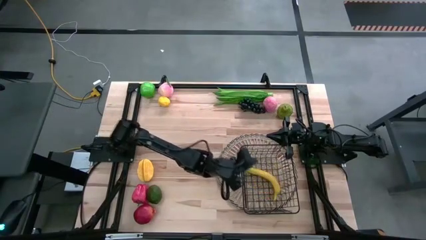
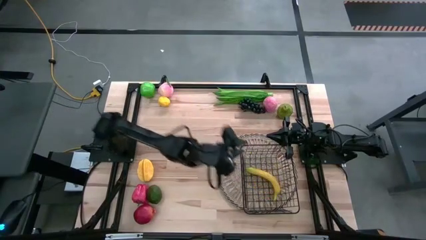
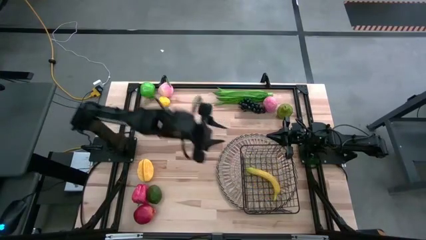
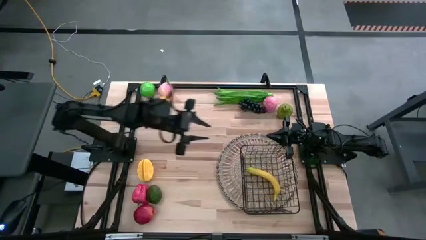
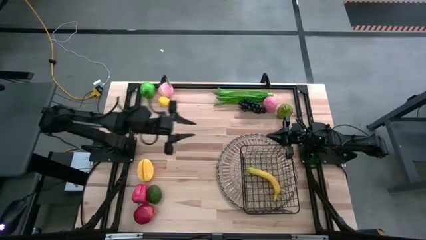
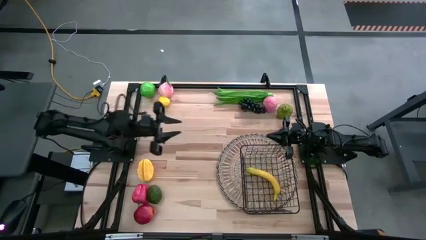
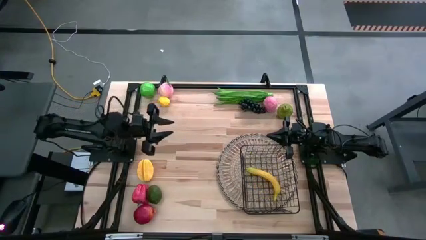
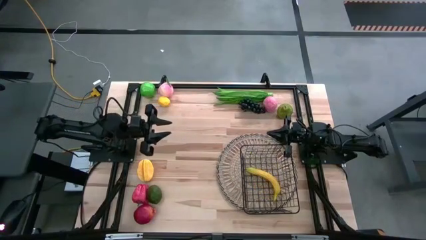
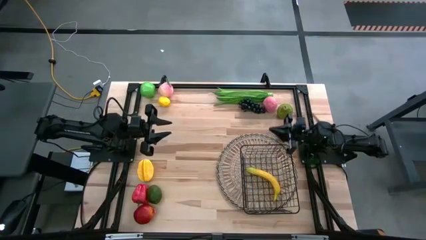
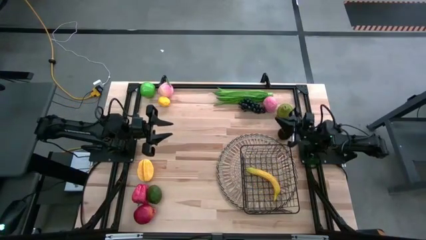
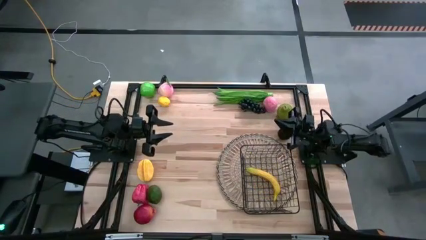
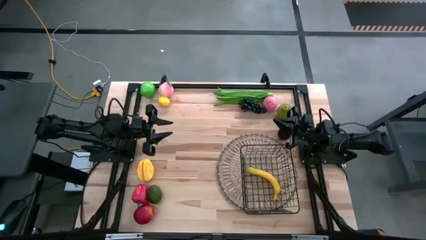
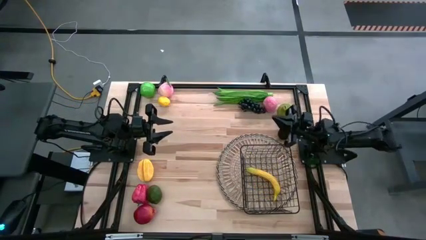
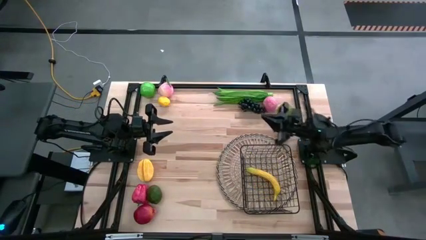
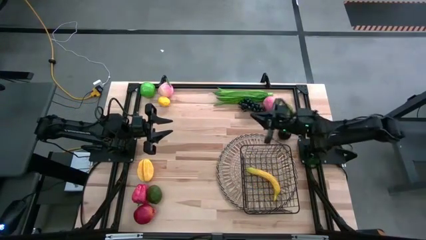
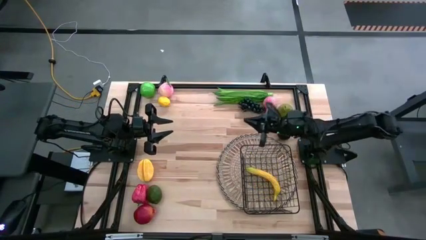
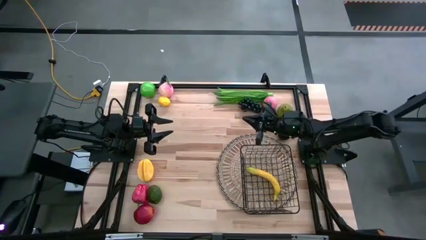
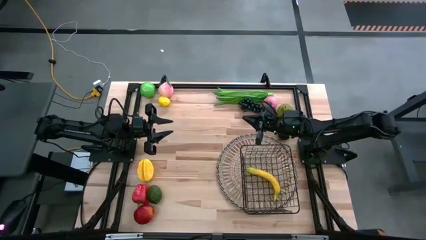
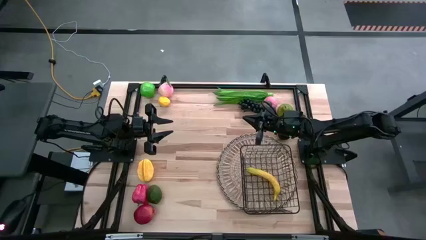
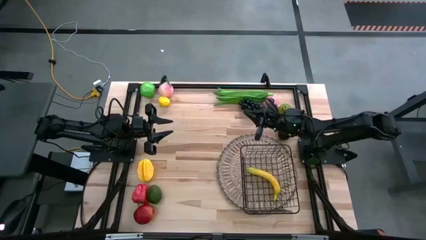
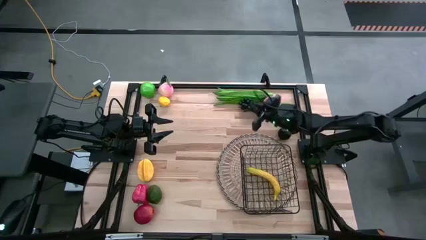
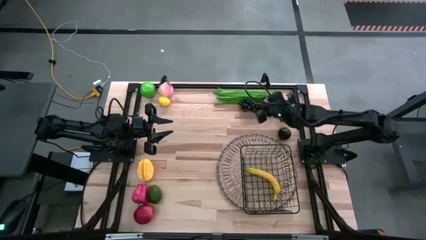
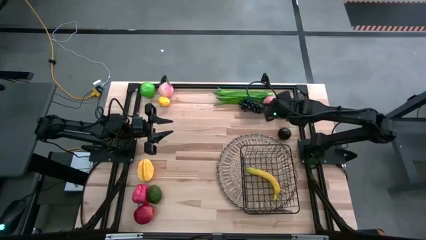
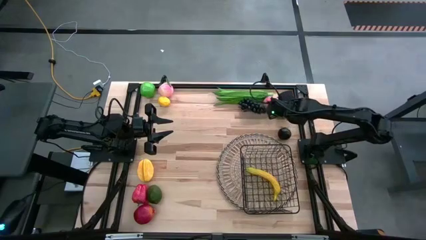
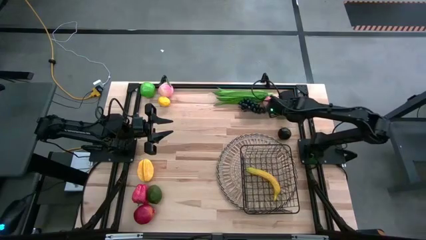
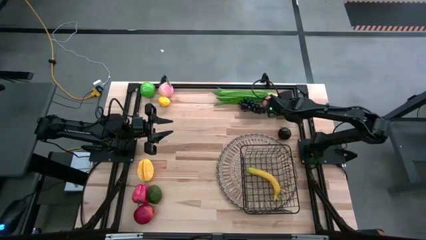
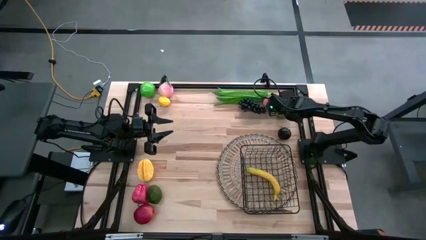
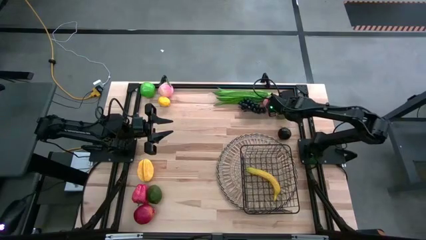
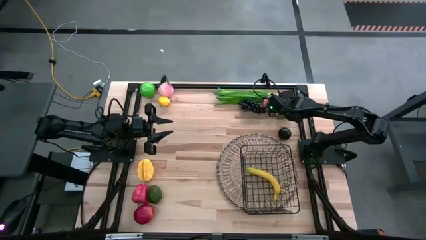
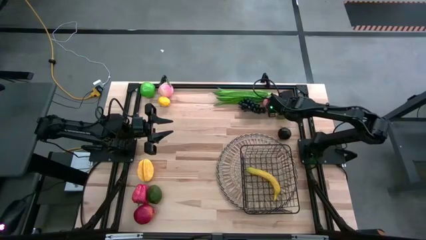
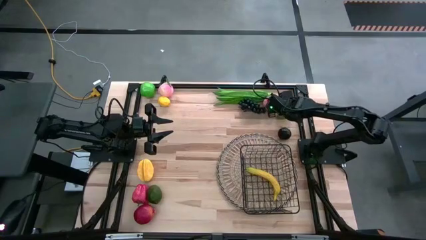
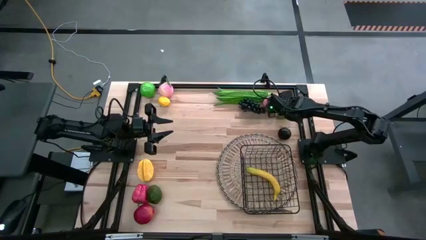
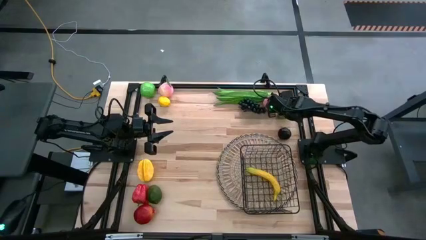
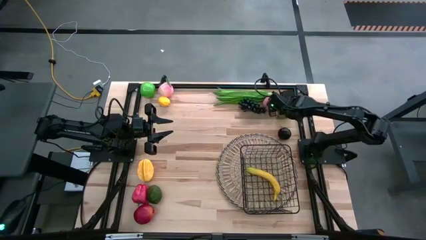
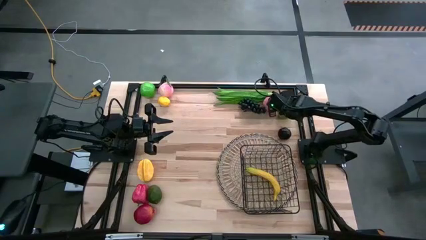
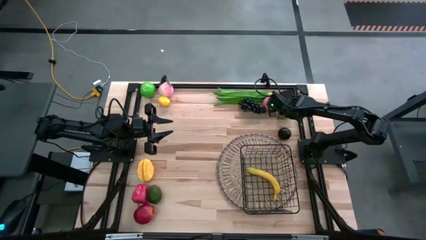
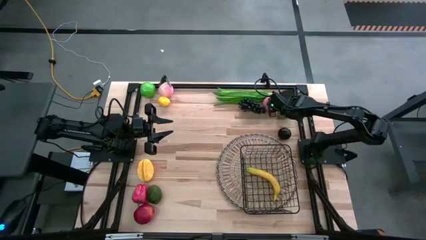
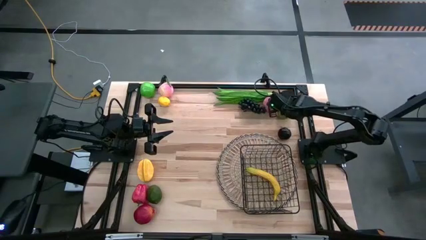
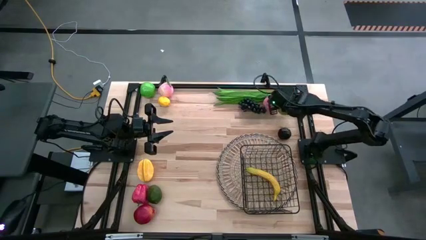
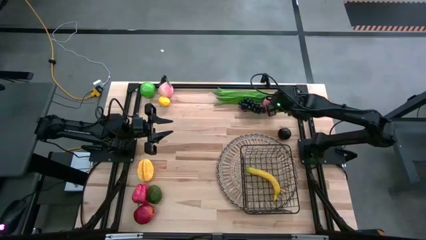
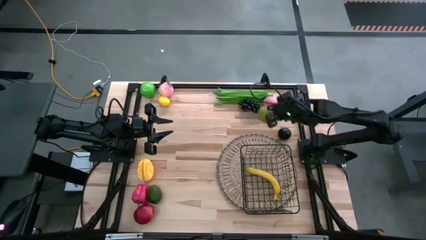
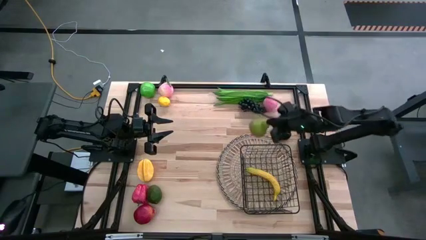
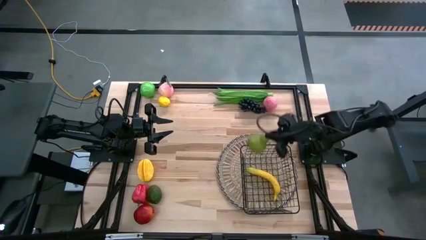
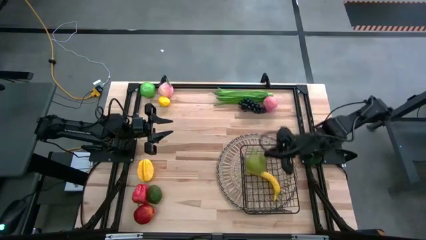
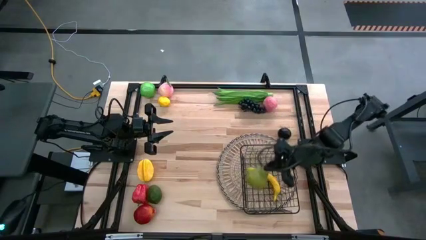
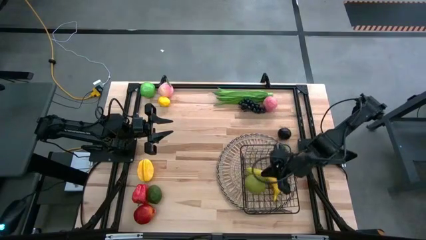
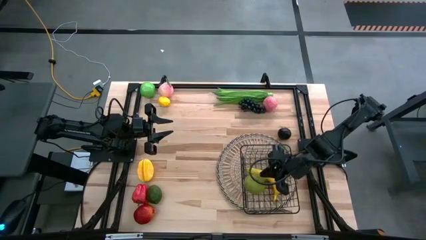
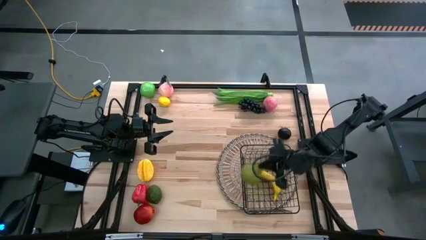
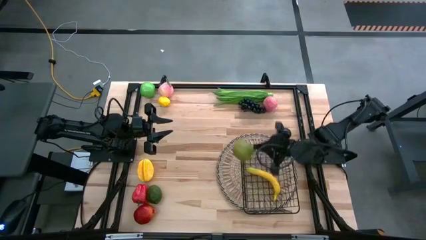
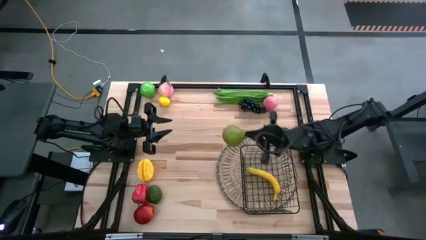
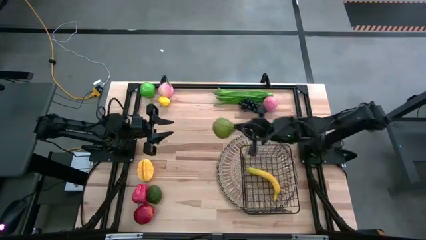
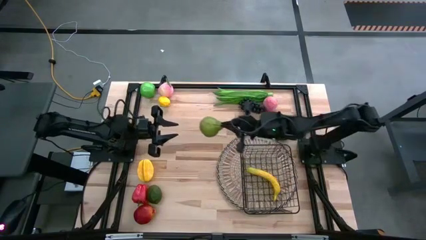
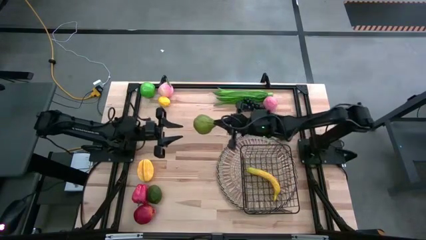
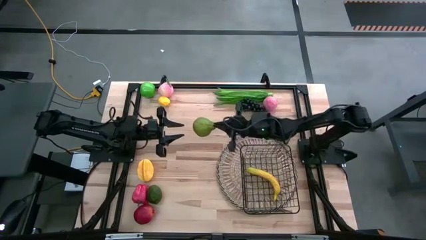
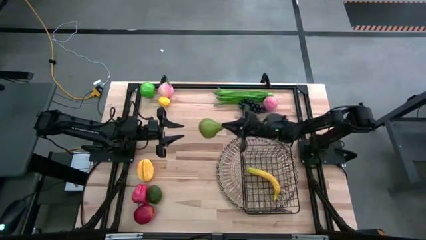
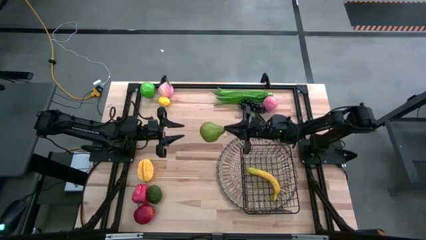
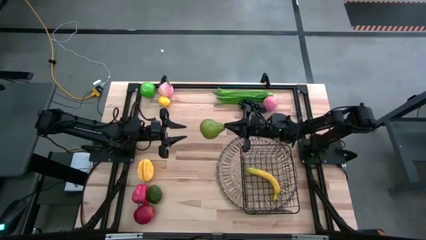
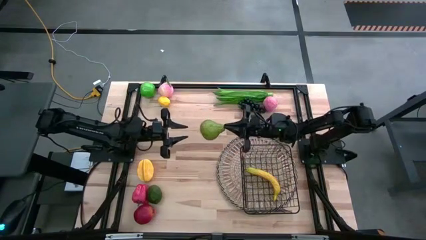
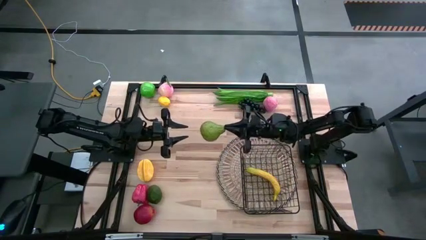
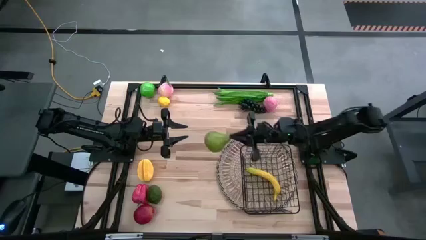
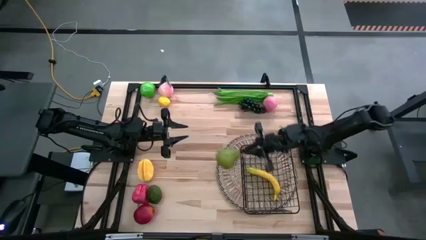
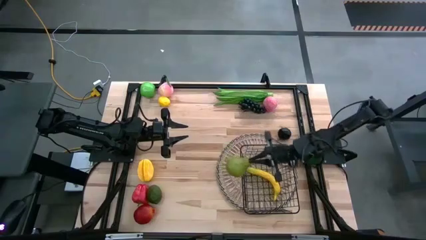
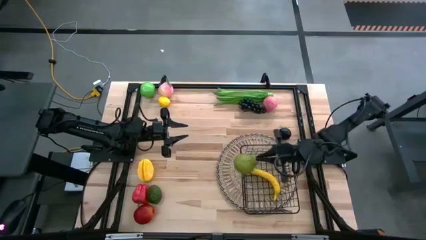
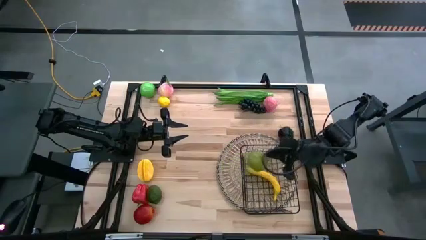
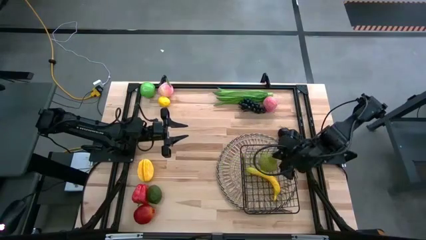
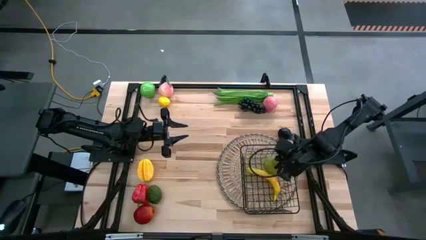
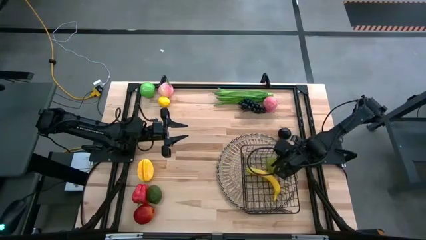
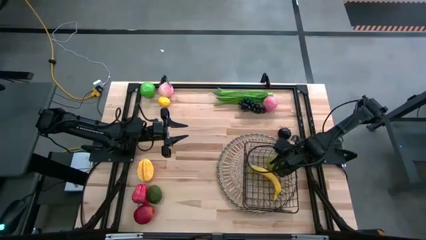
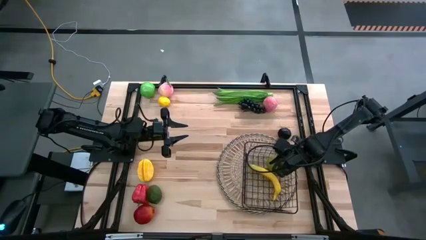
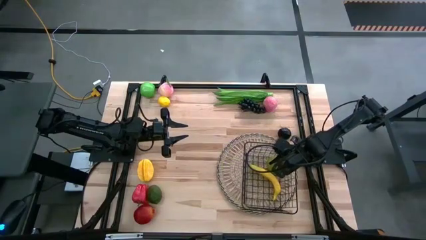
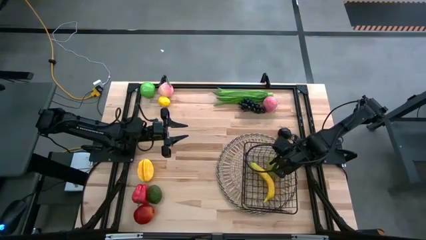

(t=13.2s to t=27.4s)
Task: Build produce basket
Put the pear into the wire basket
